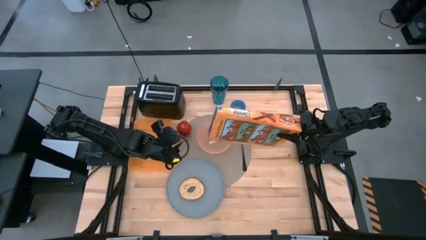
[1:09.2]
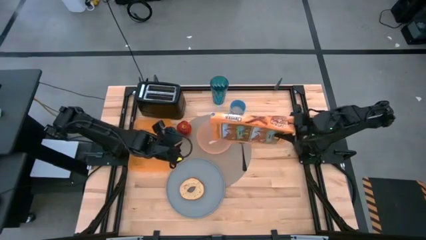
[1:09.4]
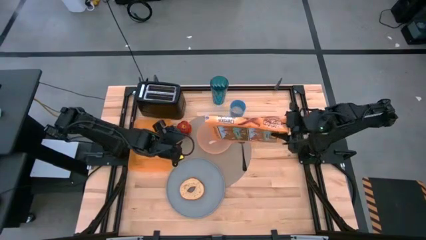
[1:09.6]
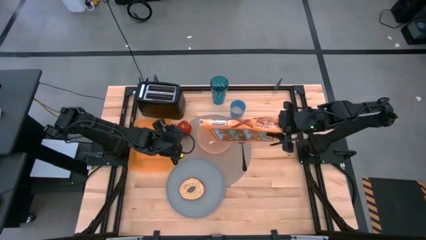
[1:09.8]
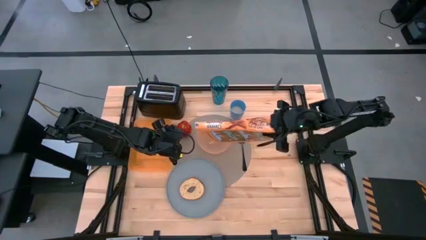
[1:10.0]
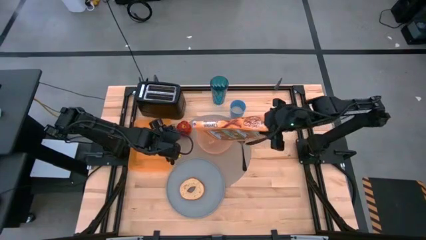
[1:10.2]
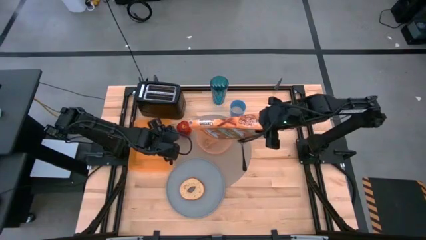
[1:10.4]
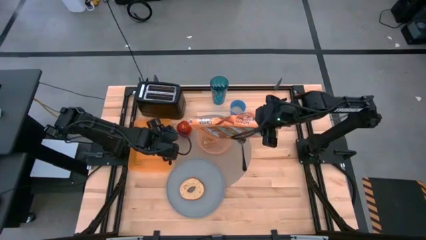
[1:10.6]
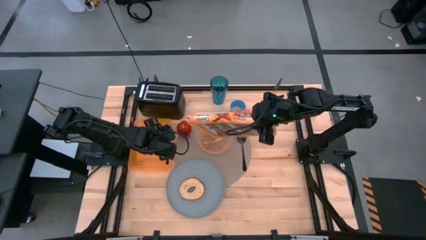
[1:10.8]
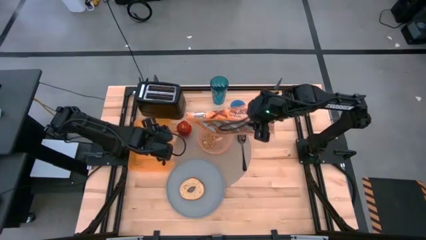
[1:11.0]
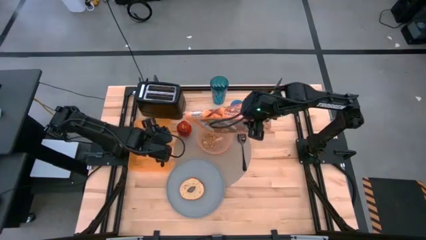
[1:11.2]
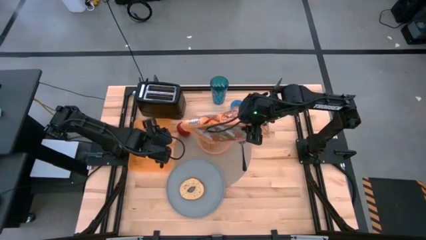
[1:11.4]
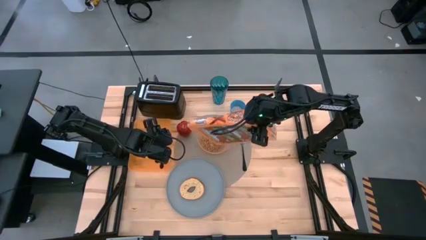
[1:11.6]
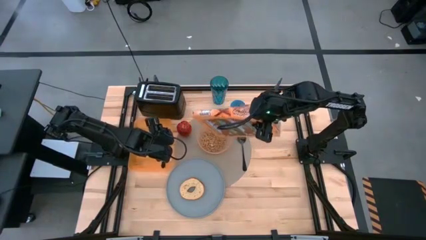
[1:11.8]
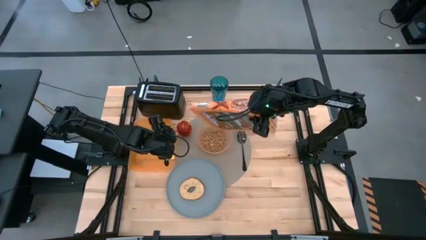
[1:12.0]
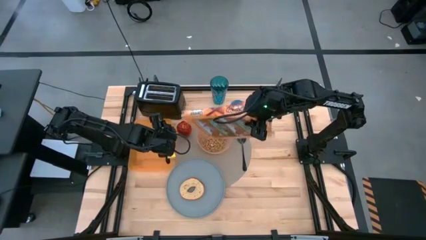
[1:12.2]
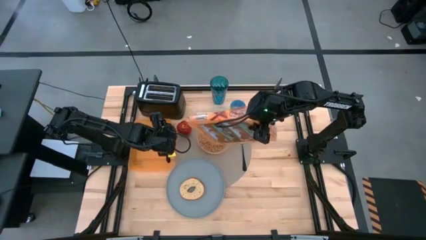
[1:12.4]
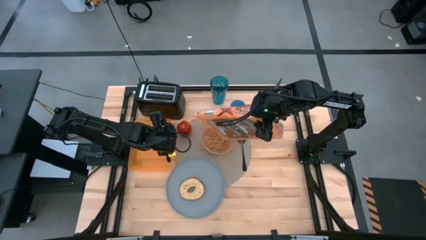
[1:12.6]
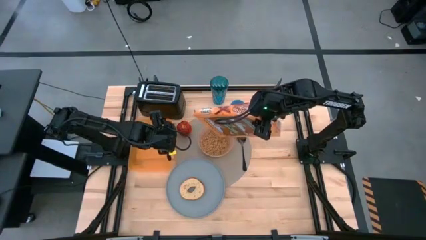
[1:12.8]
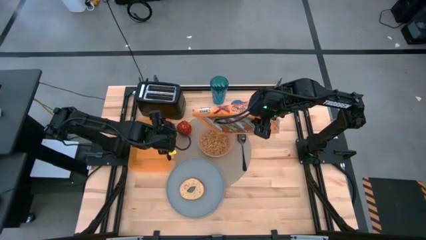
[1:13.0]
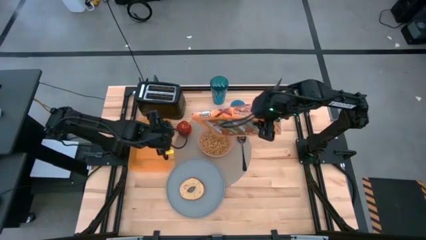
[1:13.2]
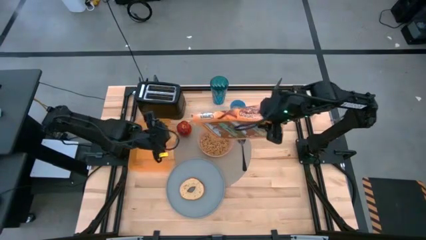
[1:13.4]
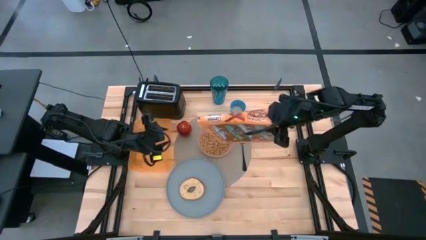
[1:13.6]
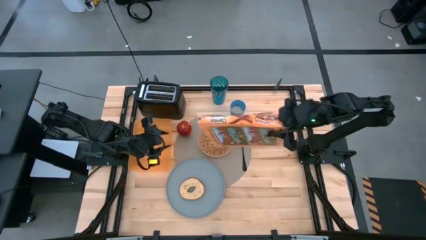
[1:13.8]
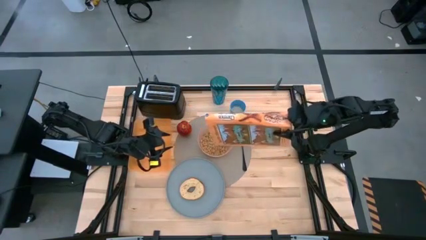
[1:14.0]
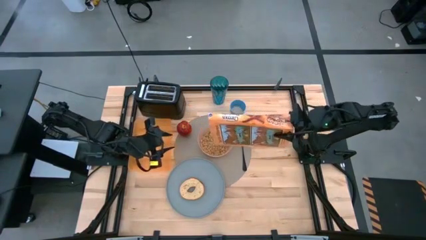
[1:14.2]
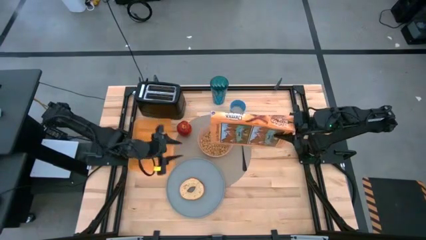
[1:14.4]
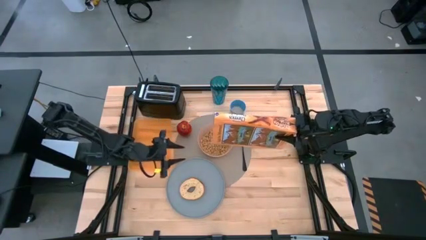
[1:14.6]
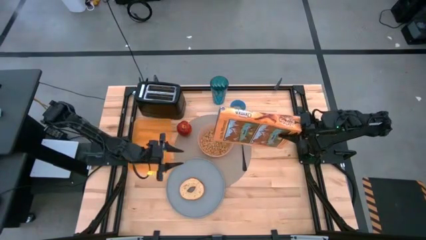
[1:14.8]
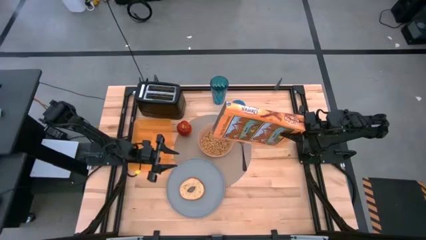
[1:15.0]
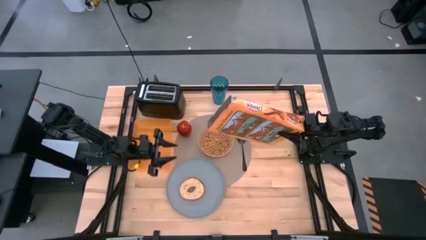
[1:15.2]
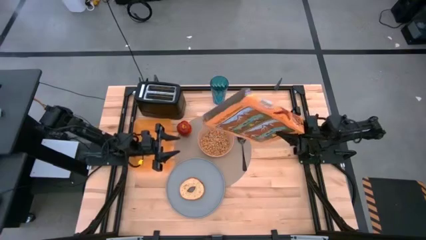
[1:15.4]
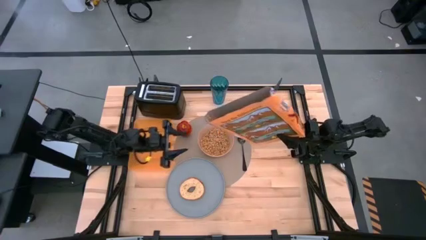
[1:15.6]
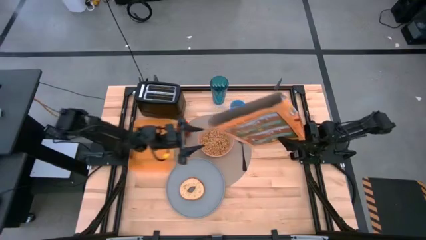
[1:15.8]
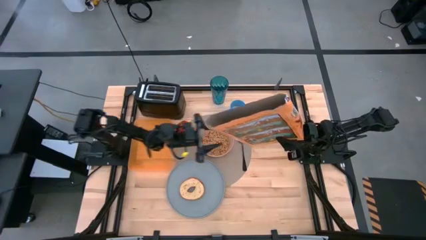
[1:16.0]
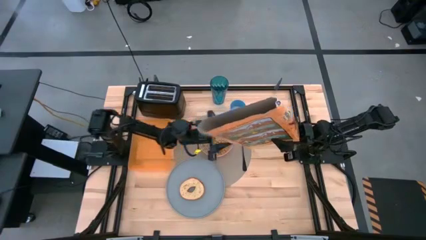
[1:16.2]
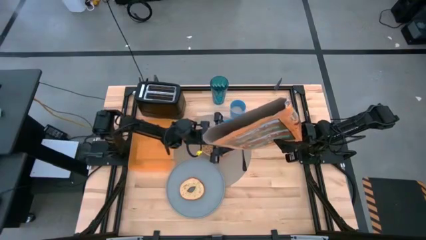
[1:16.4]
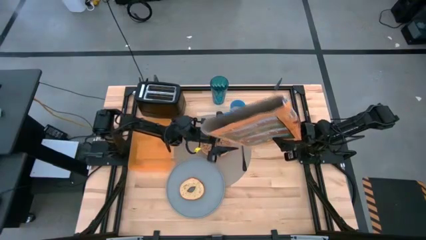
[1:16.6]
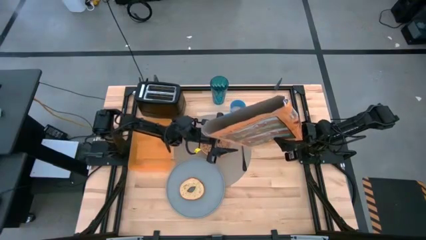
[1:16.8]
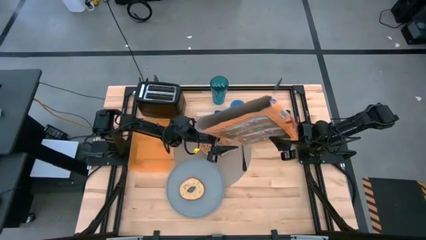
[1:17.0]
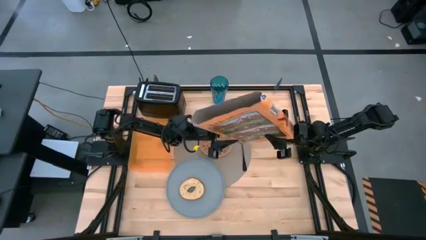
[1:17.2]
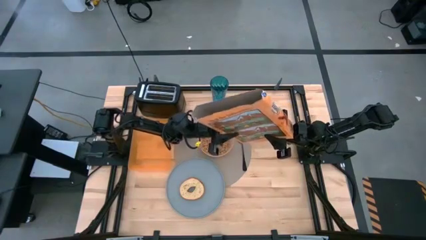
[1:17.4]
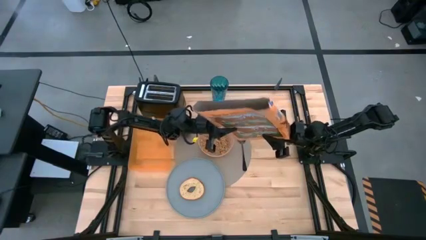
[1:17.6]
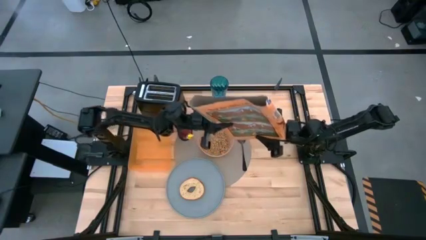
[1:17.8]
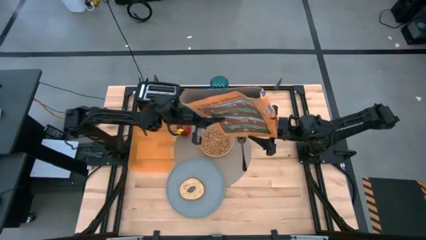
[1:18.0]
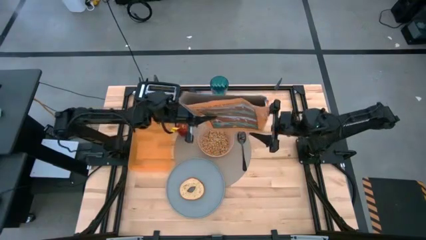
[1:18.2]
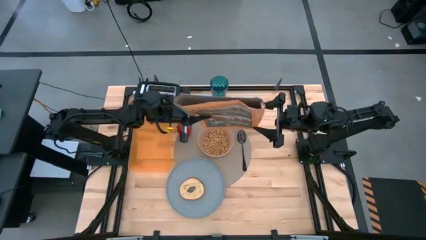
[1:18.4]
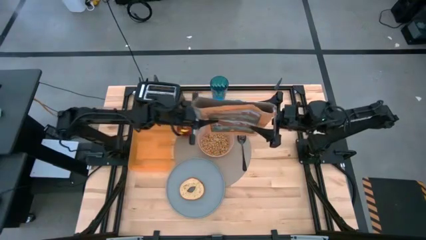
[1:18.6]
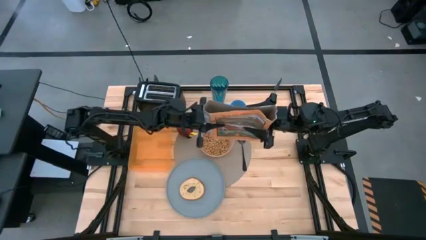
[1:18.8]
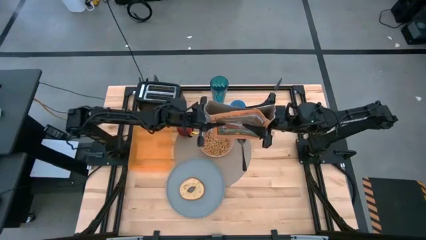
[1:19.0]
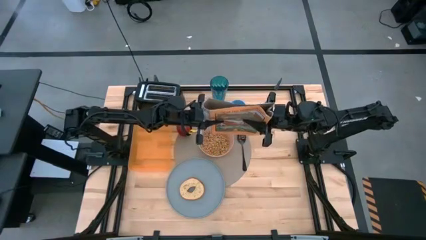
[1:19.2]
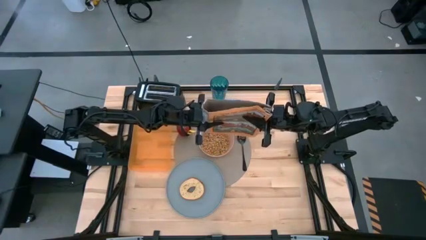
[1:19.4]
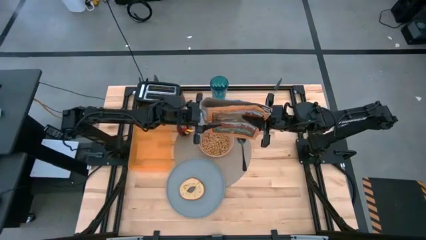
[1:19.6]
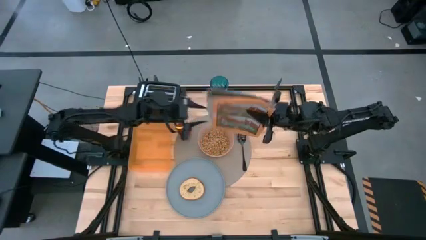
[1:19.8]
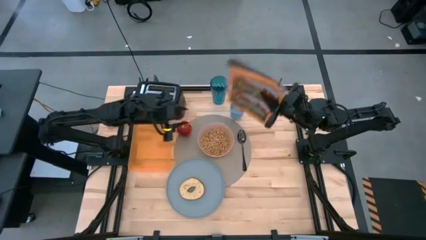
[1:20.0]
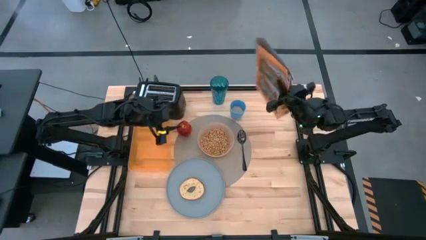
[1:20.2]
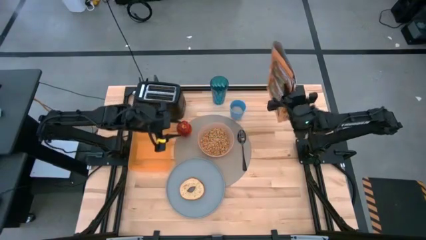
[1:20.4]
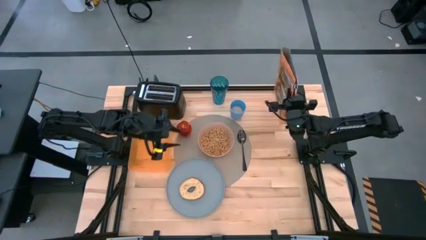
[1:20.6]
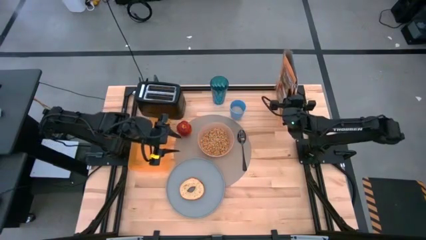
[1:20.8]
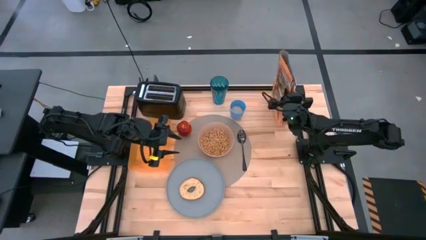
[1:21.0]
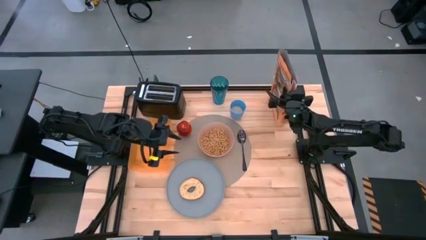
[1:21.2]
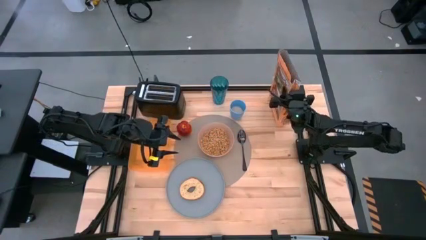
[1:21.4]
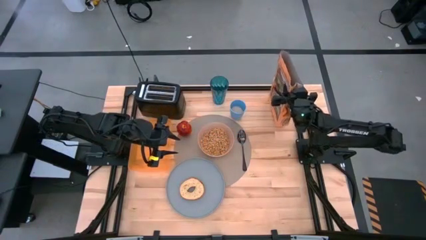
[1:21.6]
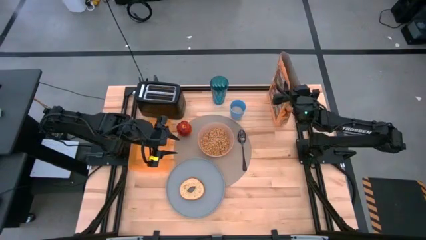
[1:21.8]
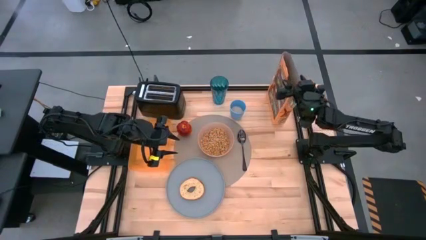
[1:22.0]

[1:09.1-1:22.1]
Task: Arrange a breakfast setting
Pour the cereal into the orange bowl

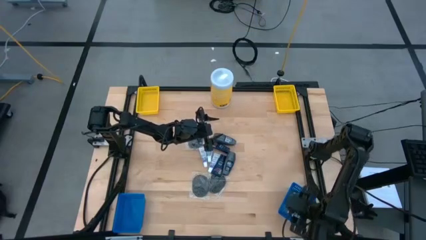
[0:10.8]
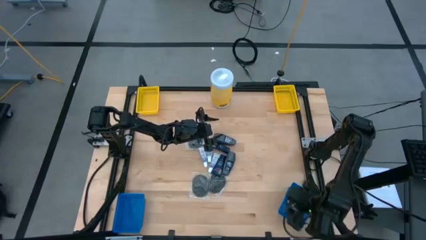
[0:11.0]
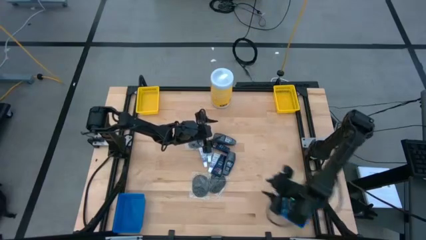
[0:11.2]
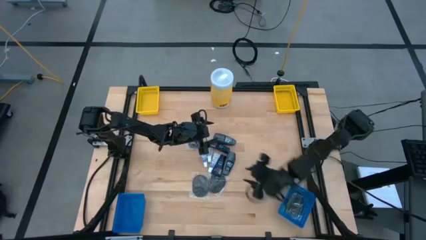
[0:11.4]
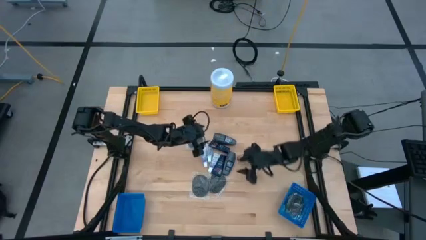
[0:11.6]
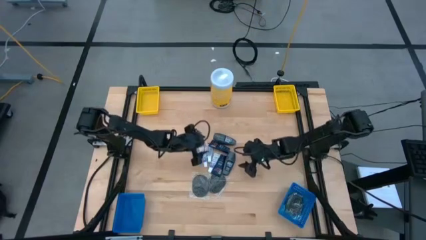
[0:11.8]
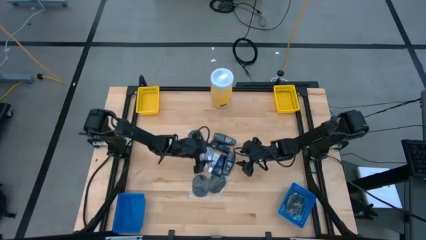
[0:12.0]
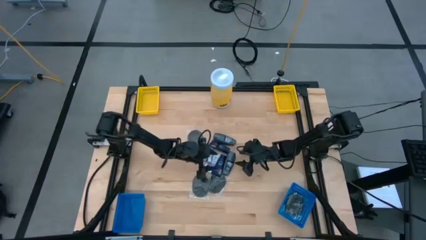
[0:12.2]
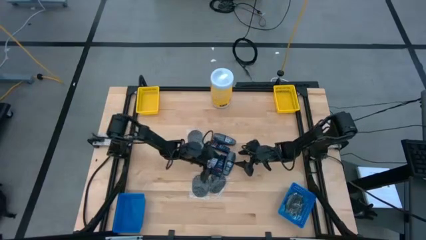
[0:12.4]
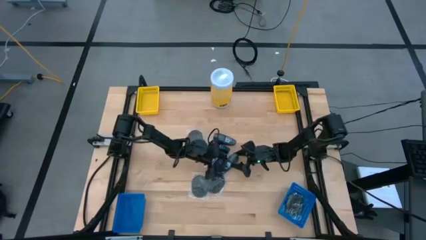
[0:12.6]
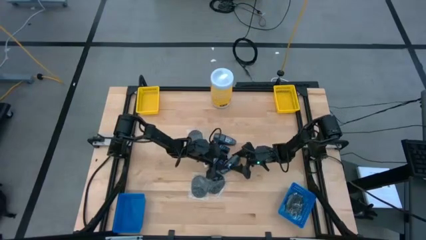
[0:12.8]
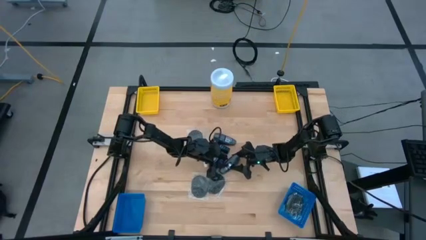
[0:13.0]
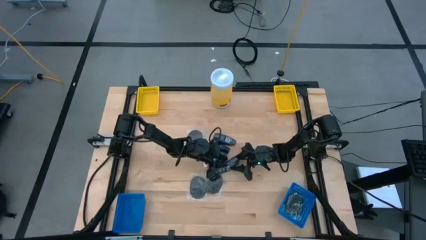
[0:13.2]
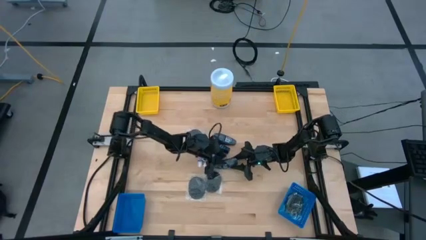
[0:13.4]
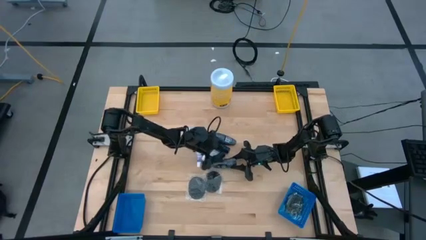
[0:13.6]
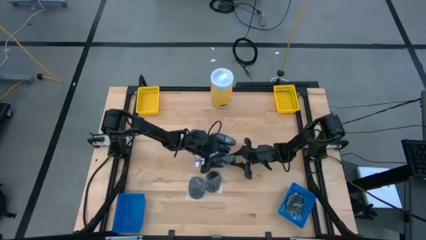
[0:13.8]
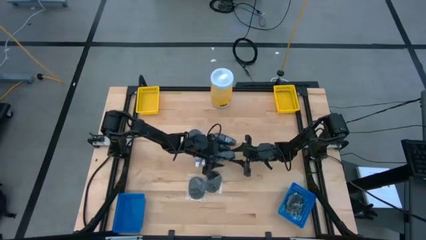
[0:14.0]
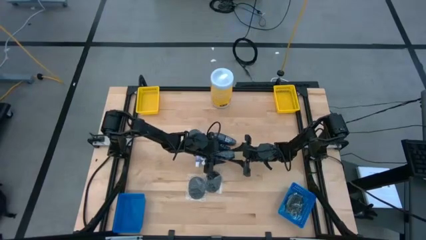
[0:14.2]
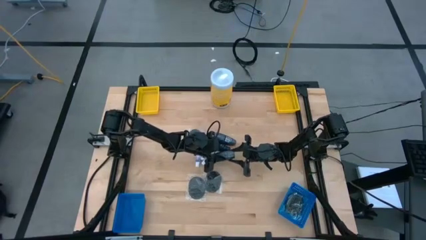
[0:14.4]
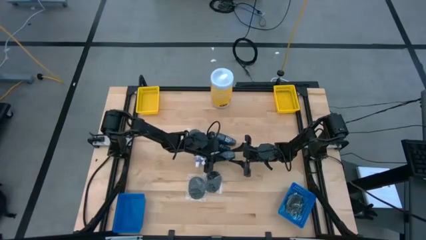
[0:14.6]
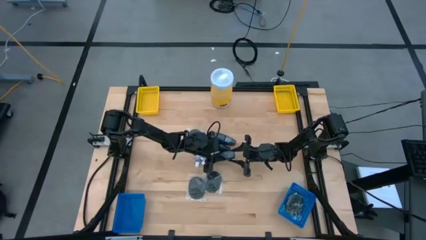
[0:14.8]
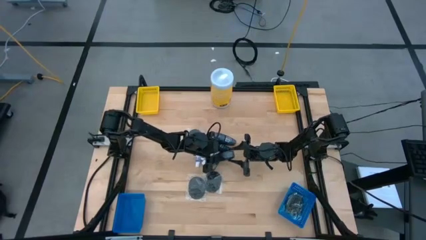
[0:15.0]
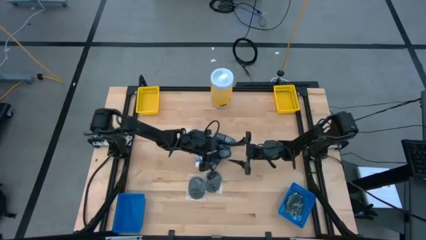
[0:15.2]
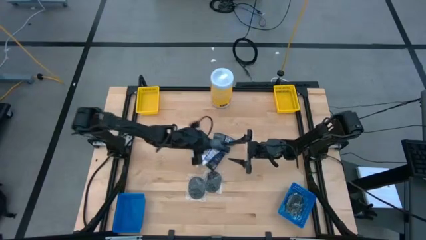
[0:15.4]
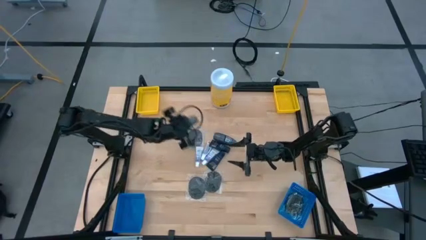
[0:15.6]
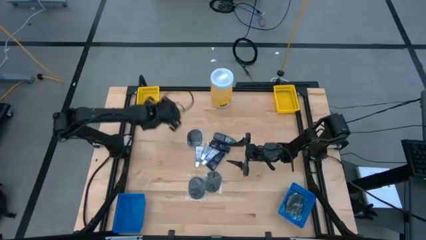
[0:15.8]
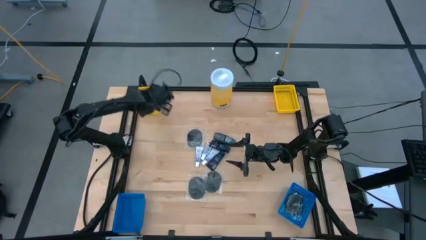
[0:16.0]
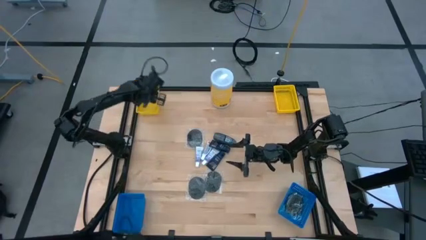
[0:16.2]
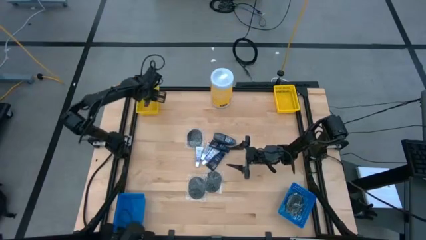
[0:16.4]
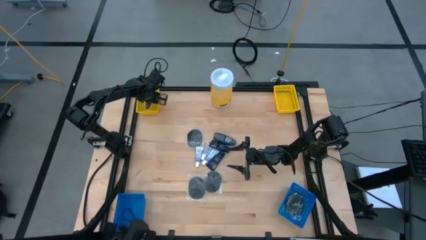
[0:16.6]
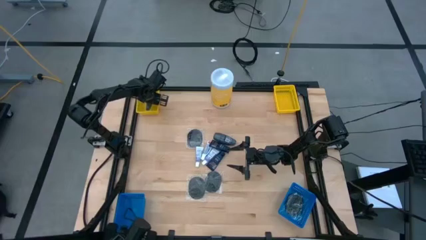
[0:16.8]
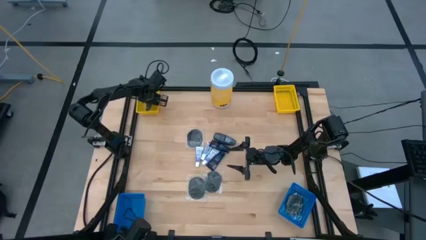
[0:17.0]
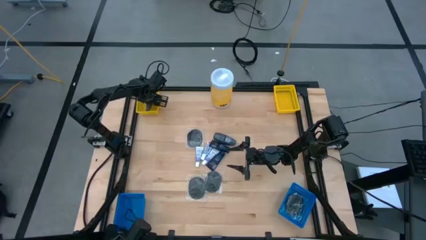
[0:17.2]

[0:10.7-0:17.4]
Task: Pick & Place Travel size toiletries
Put the gray deodorant into the left yellow bin
